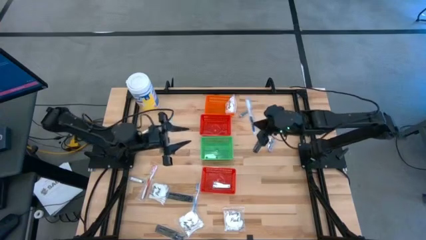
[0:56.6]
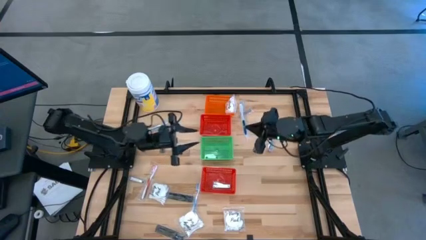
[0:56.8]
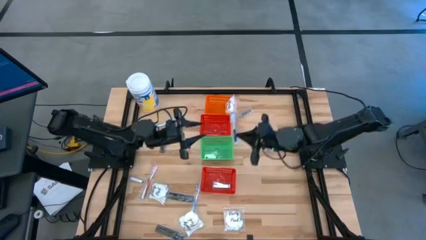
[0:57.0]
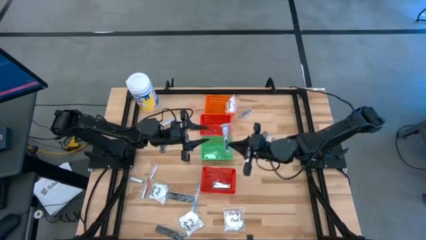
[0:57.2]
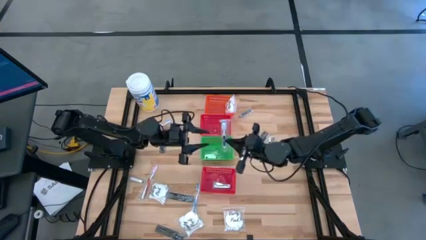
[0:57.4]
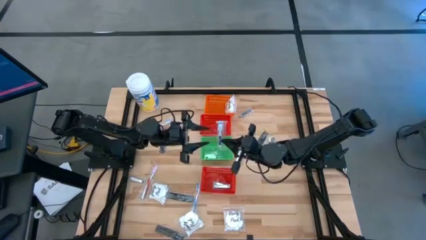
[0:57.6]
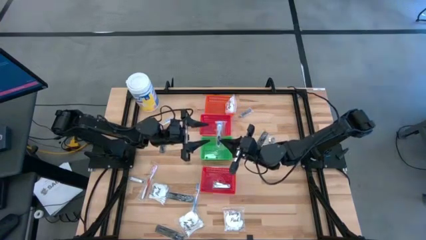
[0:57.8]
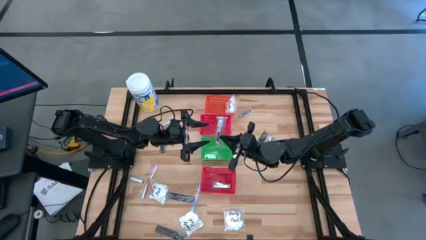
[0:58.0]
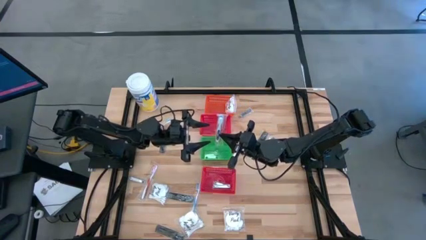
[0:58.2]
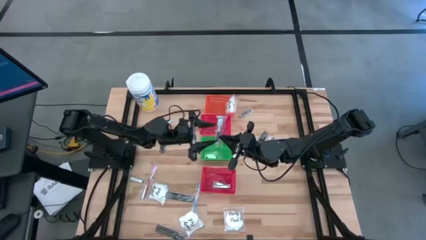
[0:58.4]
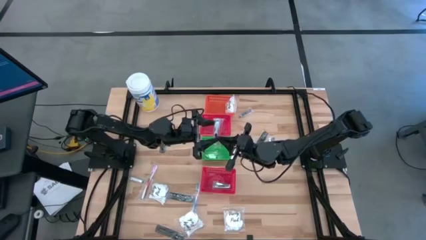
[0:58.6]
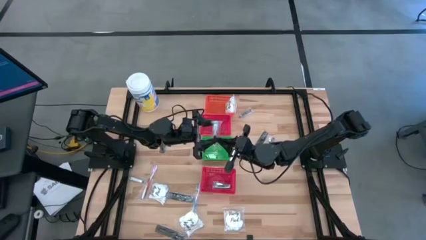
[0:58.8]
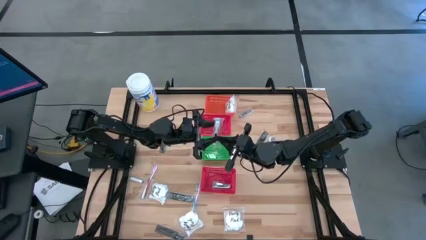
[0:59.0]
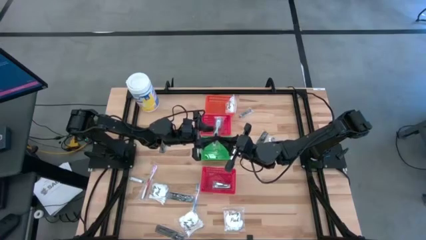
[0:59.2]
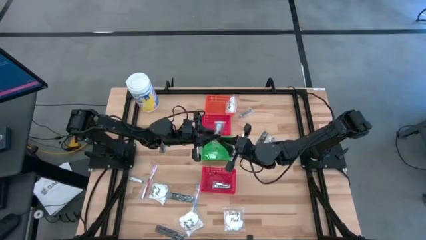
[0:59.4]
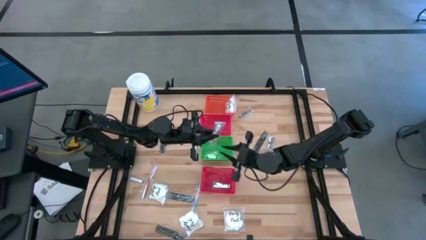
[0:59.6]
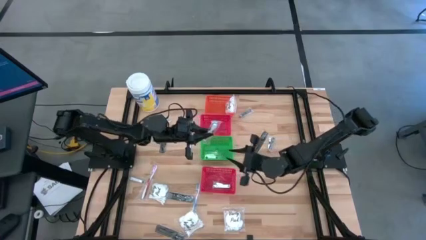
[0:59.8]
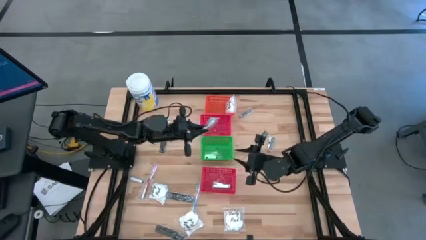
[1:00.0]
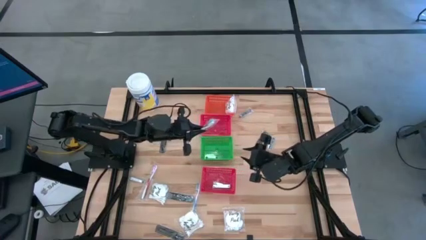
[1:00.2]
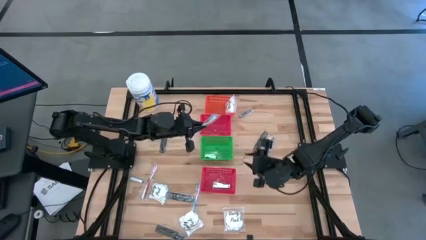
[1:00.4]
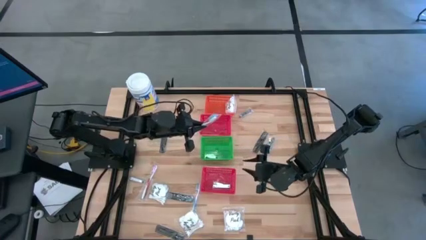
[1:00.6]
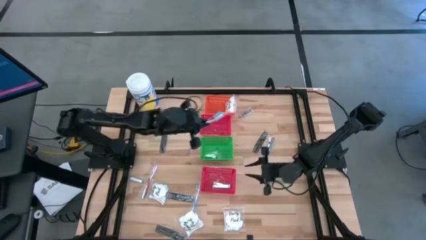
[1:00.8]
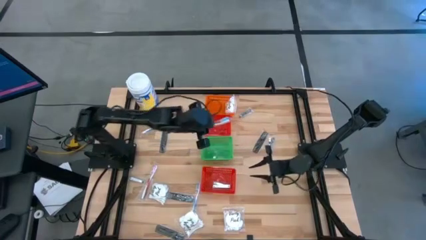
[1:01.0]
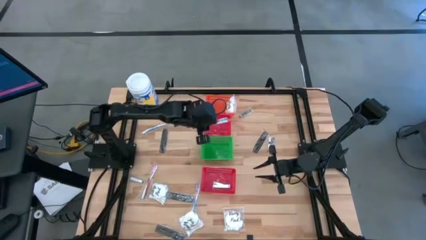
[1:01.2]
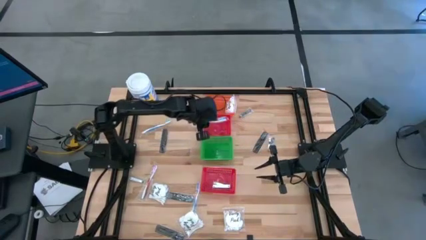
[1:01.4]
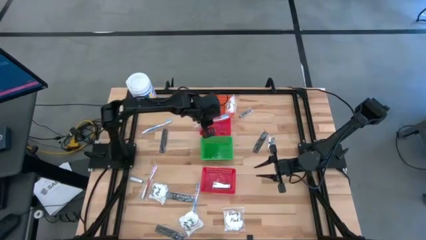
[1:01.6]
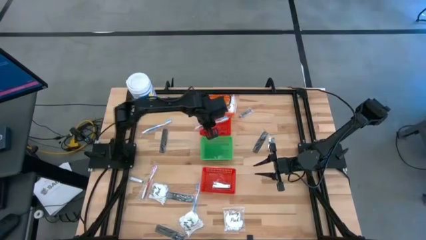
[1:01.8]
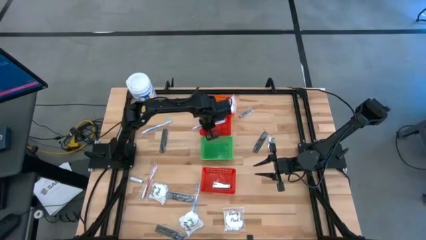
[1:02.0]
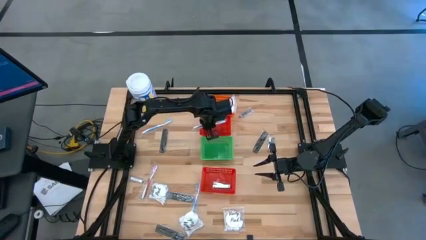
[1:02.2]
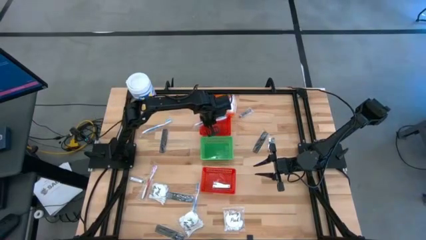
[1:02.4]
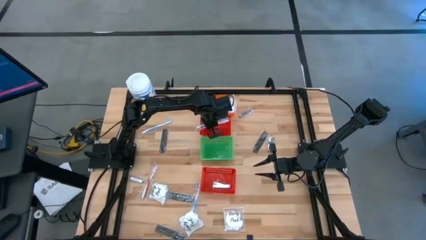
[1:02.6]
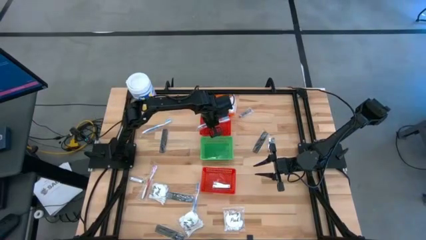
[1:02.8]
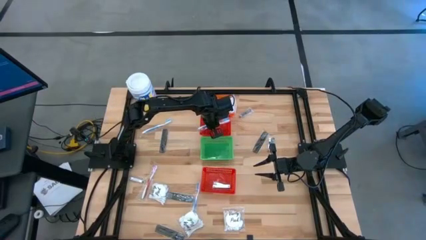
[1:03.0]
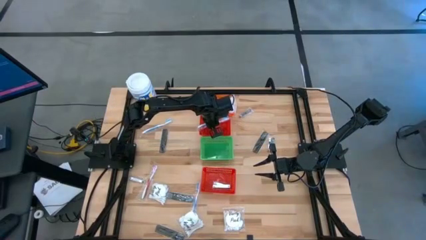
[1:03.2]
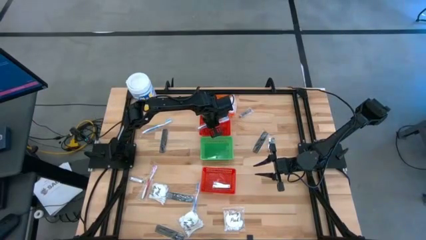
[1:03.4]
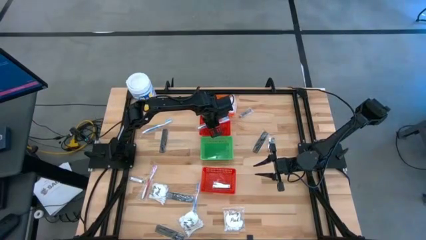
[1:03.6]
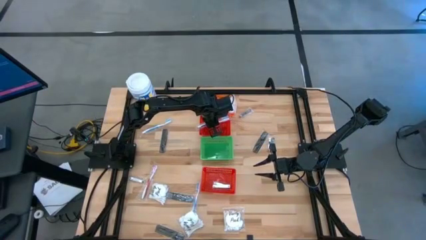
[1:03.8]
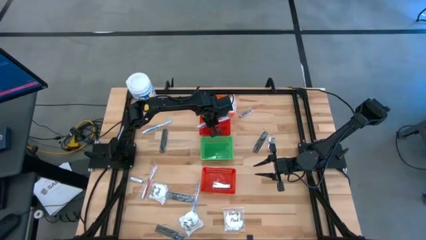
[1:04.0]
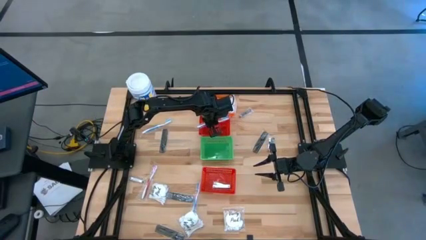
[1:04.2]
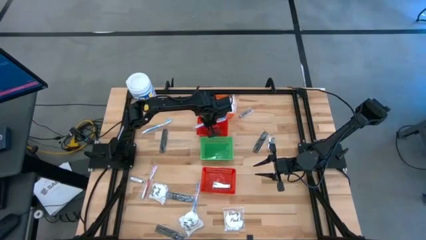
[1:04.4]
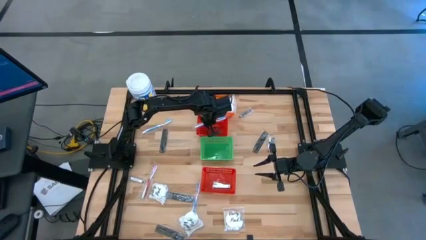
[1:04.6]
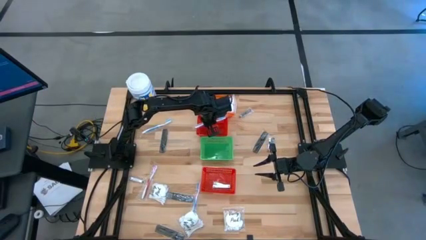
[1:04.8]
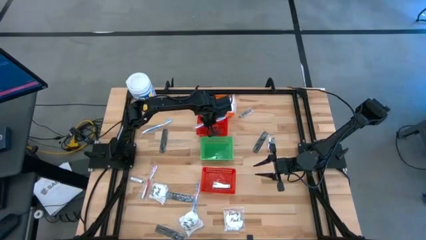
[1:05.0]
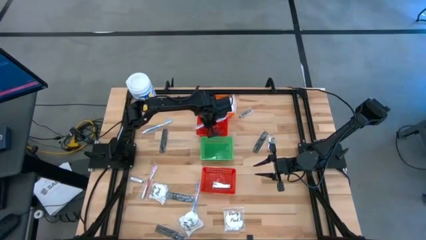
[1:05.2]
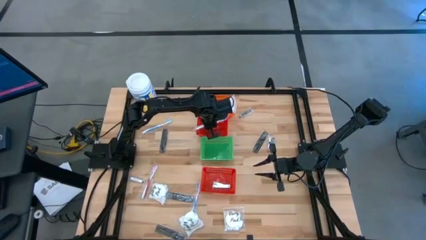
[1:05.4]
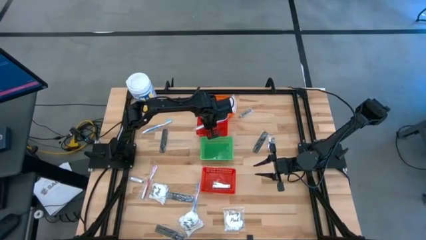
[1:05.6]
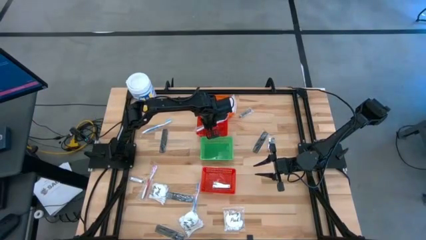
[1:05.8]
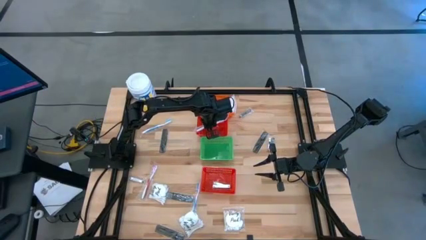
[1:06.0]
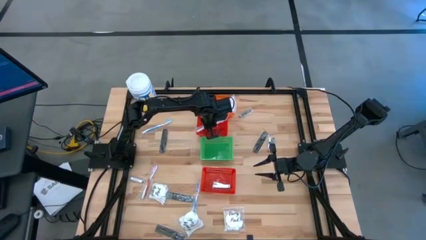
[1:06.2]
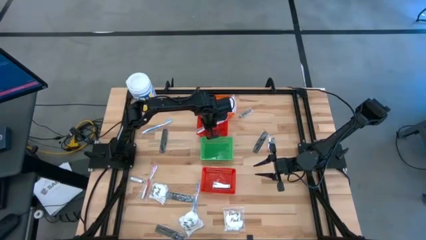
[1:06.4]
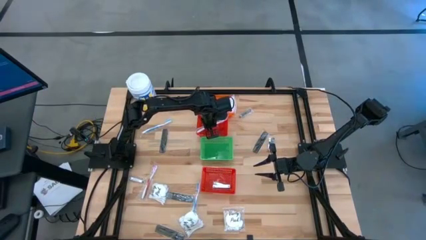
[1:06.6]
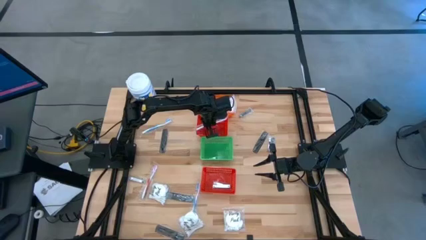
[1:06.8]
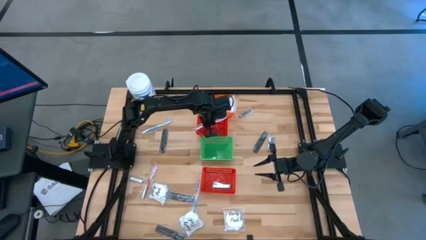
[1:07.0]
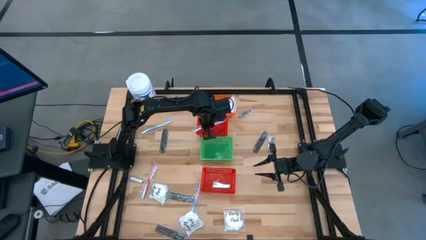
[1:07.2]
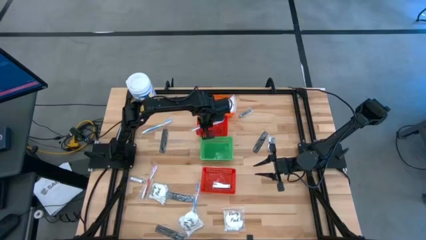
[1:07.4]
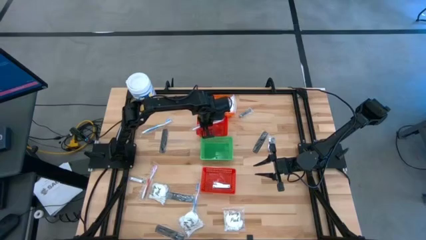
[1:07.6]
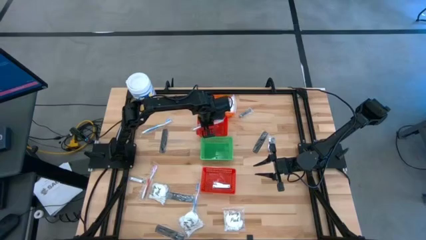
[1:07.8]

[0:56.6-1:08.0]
Task: Pick & Place Travel size toiletries
Put the blue toothbrush into the top red basket

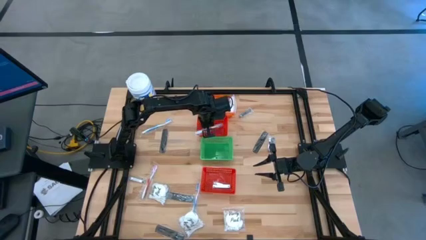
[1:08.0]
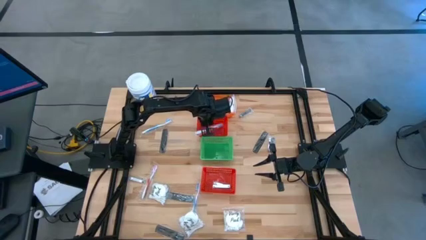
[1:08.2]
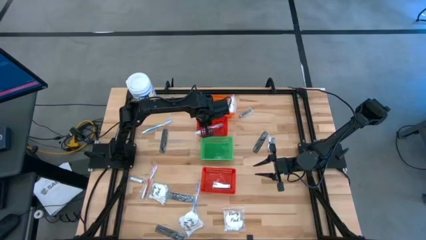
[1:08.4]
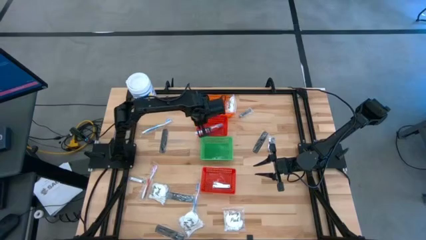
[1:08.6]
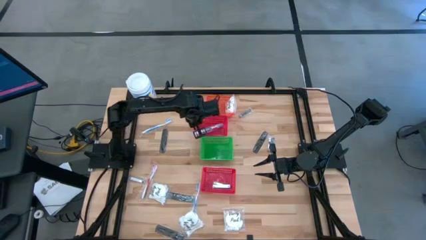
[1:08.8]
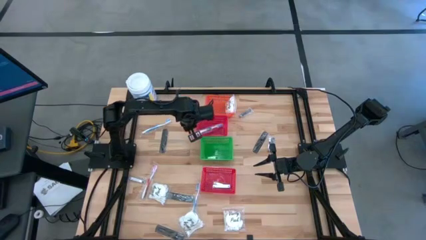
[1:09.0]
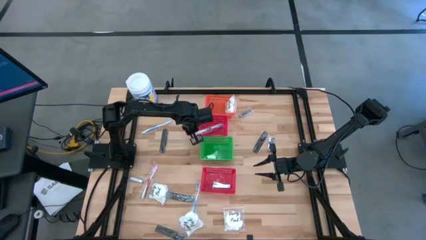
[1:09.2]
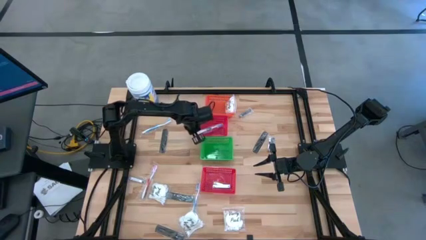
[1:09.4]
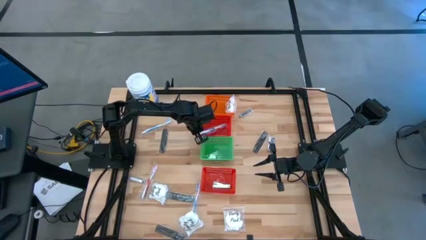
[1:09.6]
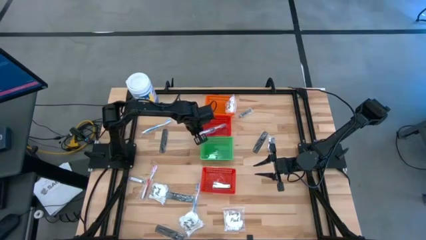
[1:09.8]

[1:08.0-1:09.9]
Adjust the top red basket

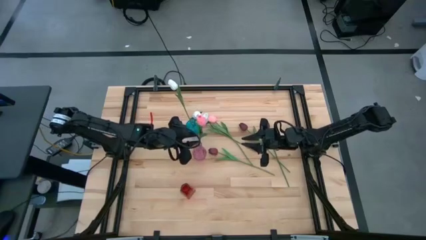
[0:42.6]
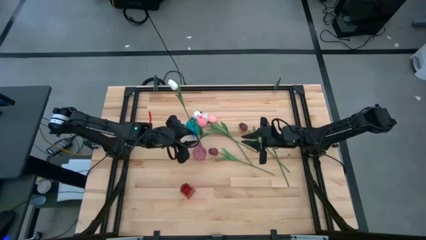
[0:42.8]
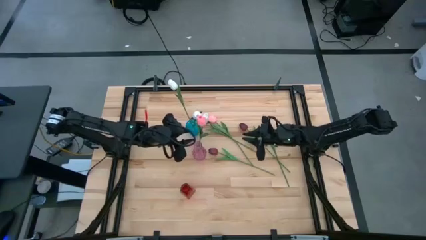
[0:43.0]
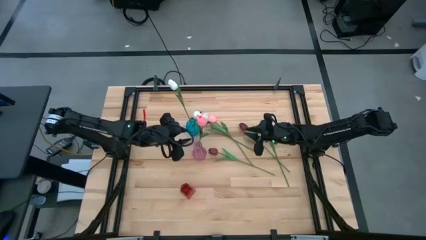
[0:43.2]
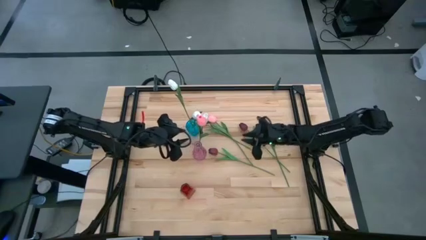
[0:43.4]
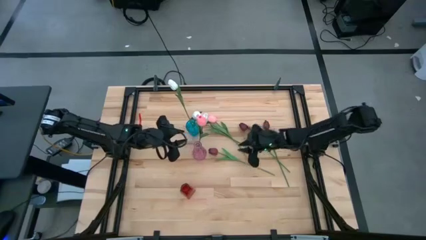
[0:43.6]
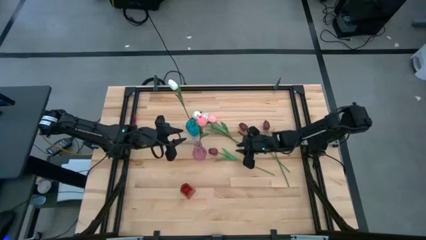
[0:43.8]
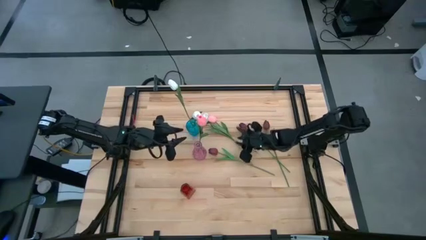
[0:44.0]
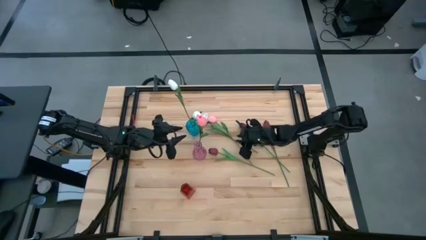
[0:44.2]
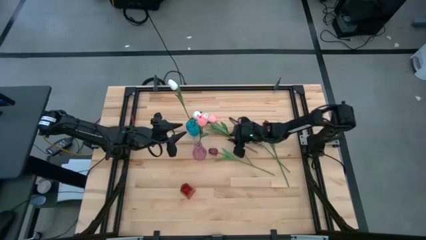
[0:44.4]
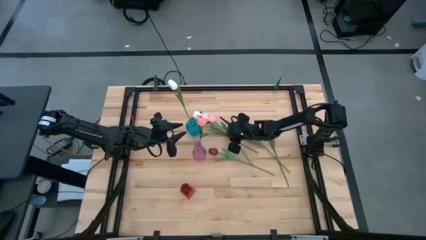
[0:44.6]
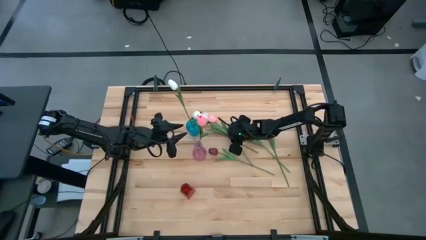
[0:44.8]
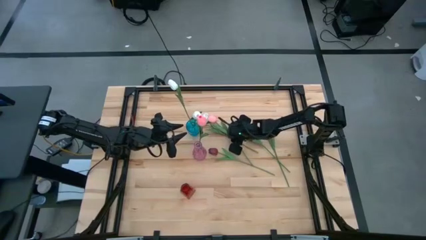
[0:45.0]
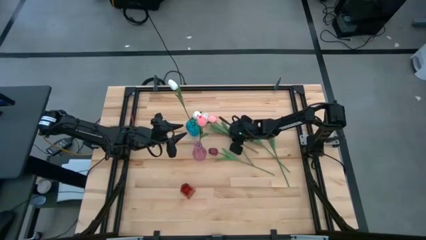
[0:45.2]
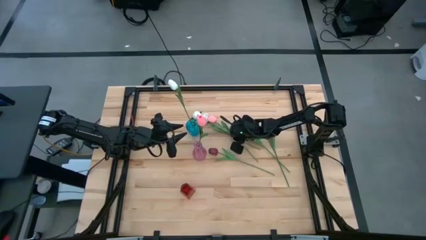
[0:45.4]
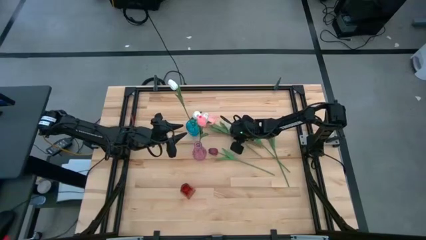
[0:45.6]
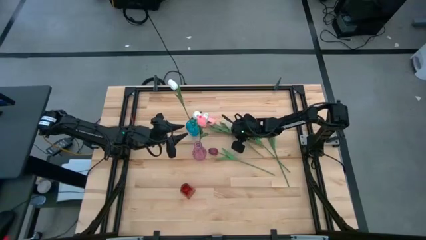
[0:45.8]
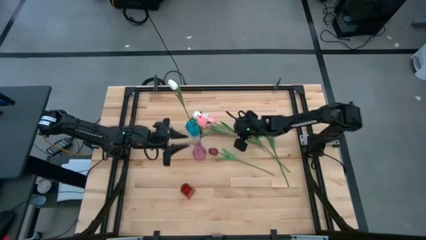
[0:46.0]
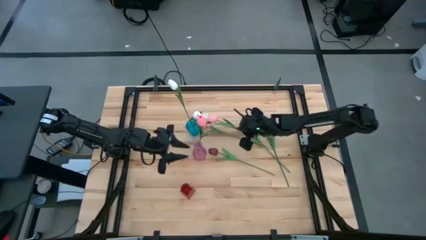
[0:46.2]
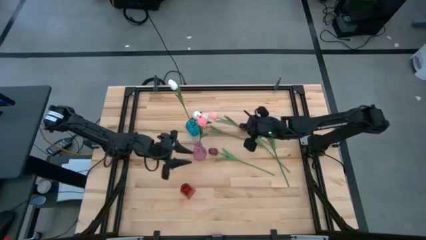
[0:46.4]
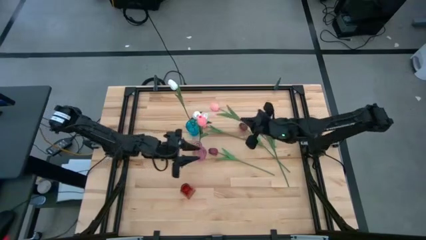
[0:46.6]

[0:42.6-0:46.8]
Task: Sort flowers into vase by color
Put the right pink tulip into the purple vase
